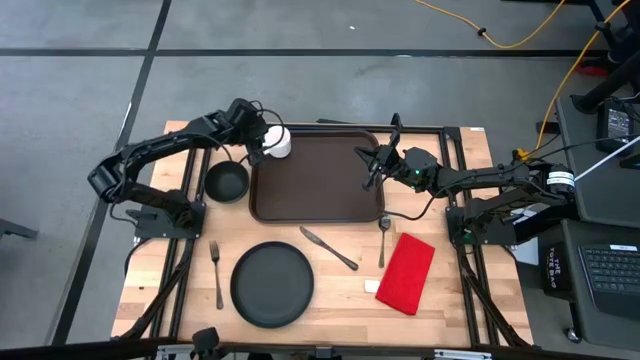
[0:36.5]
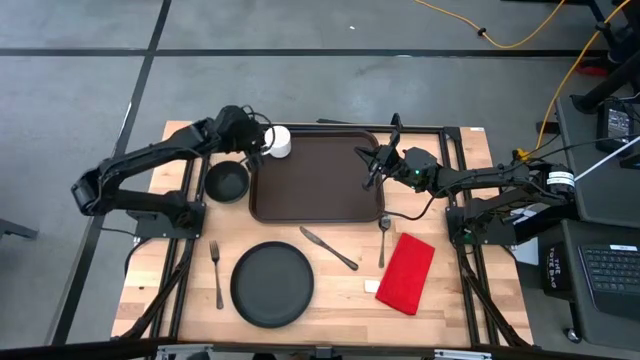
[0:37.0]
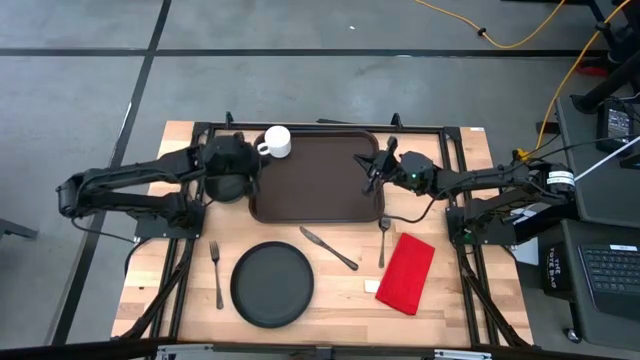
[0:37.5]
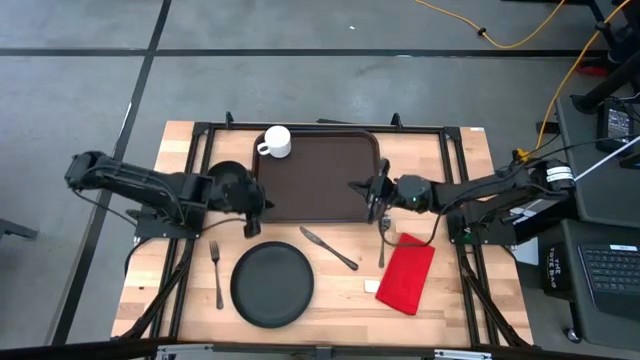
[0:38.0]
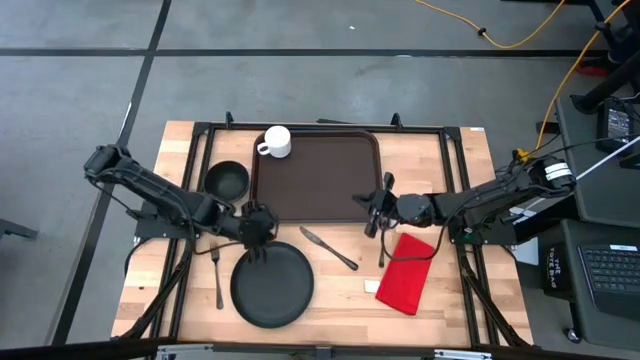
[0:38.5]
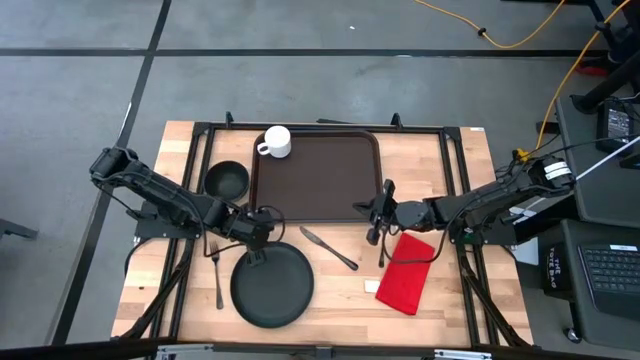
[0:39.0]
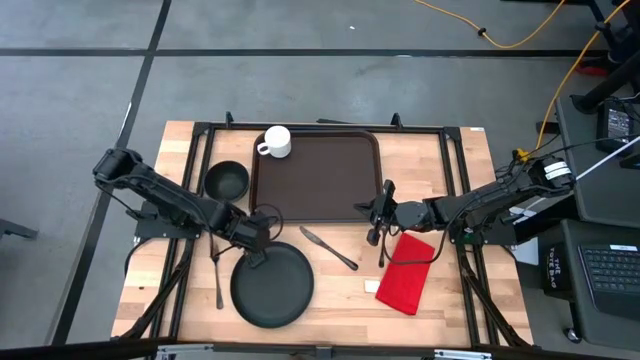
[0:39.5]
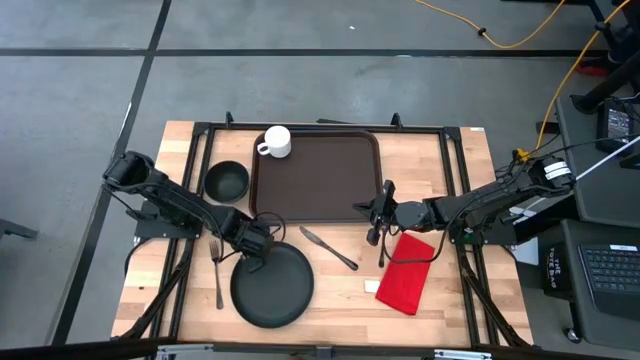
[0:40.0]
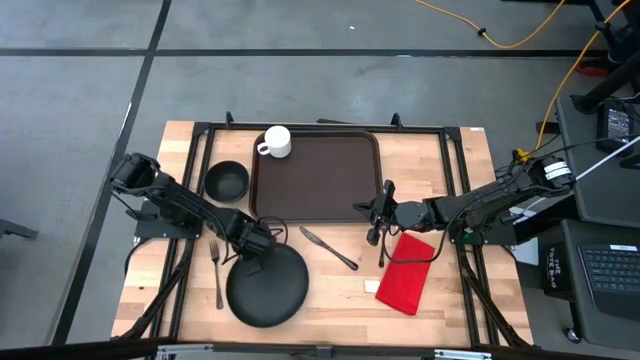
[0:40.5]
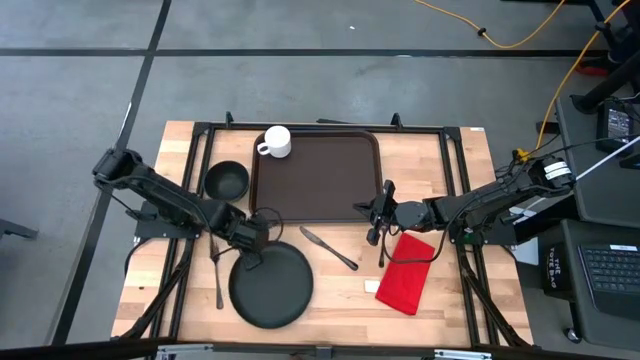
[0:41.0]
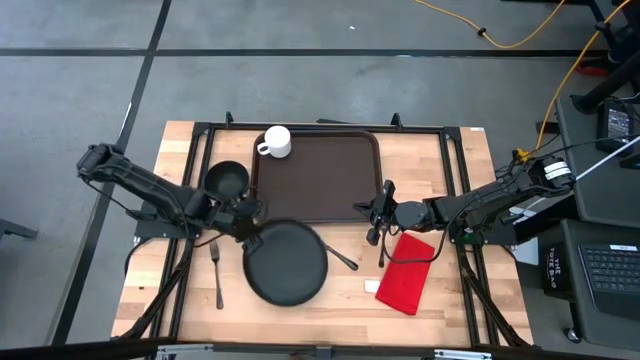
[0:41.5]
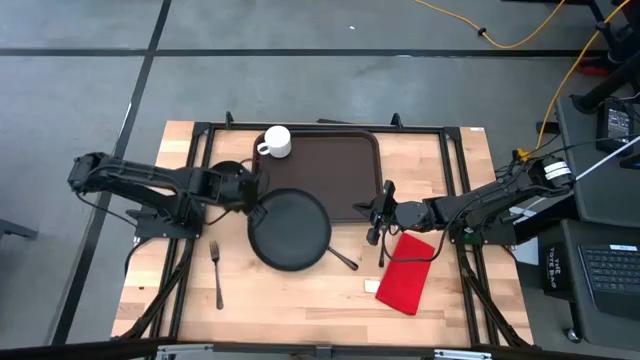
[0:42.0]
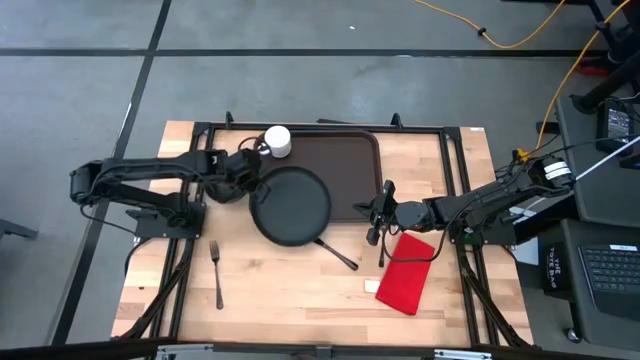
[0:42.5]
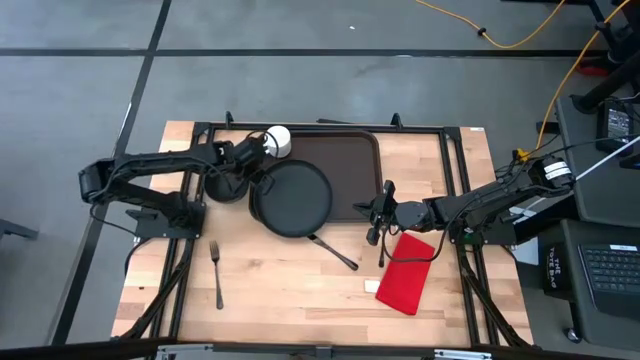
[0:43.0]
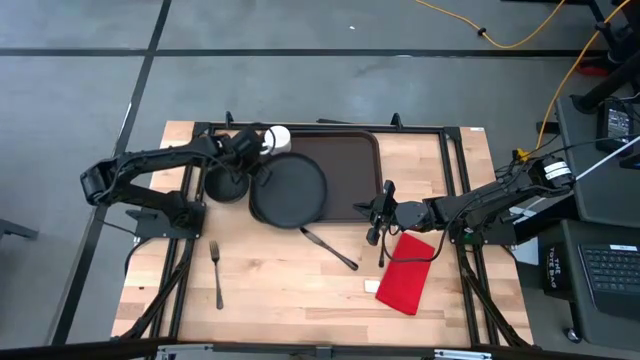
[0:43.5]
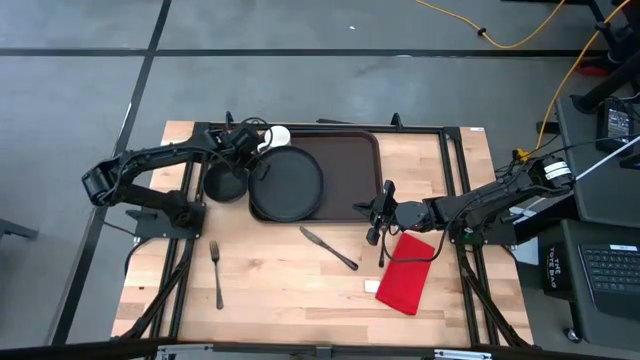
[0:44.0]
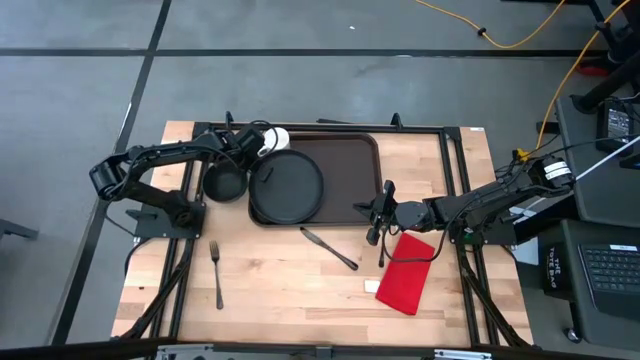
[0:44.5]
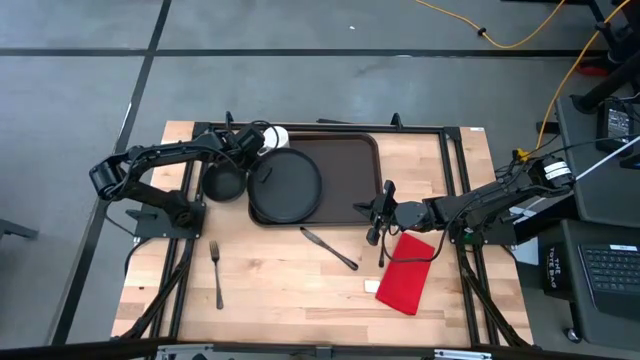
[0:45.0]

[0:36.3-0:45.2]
Task: Set up tray
Put the black plate to the bottom of the white cup on the brown serving tray

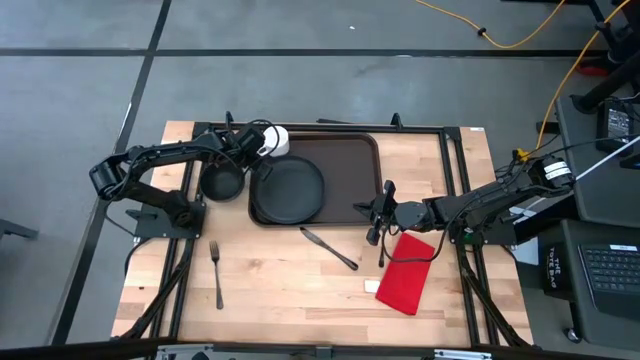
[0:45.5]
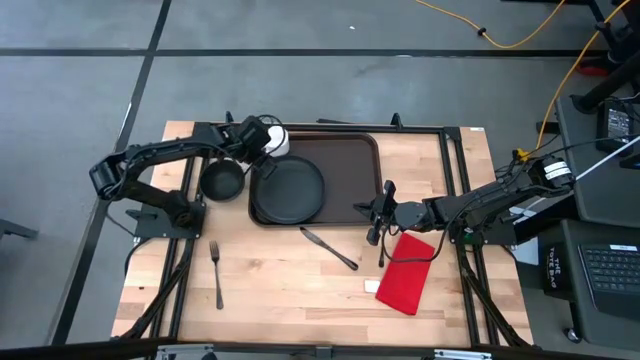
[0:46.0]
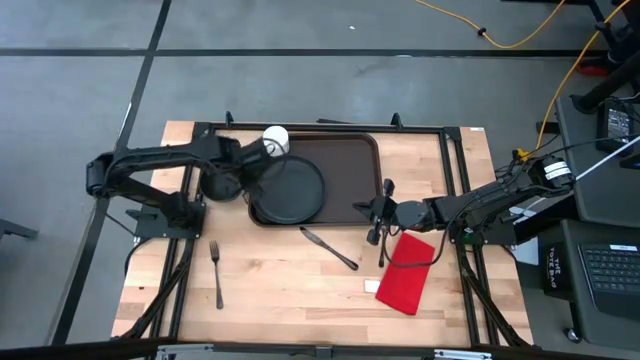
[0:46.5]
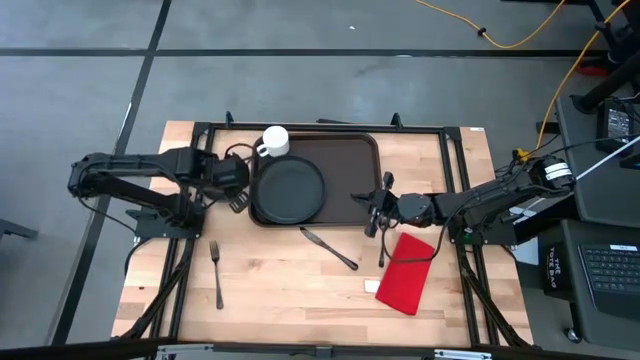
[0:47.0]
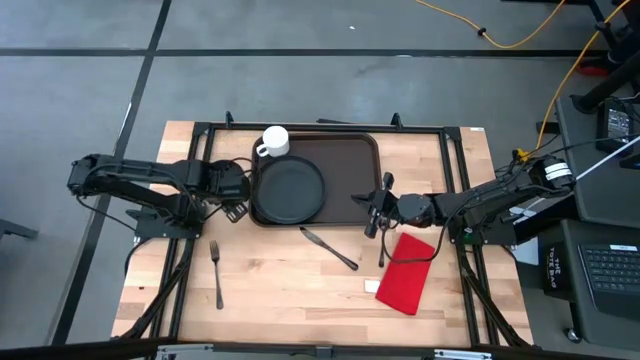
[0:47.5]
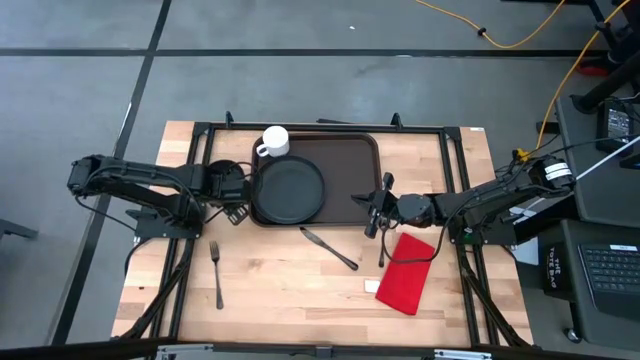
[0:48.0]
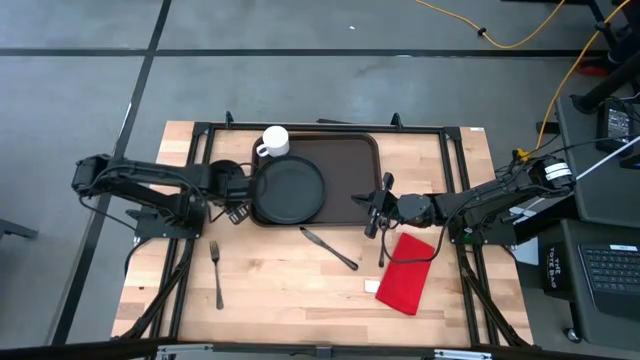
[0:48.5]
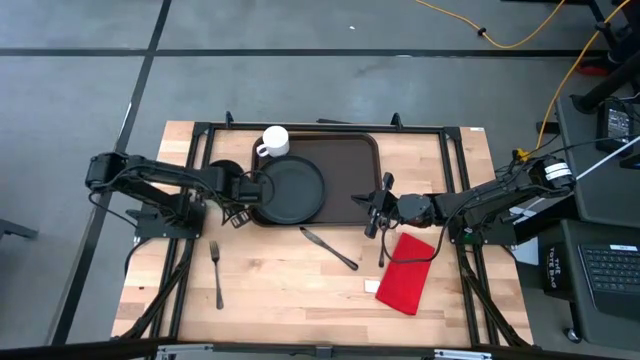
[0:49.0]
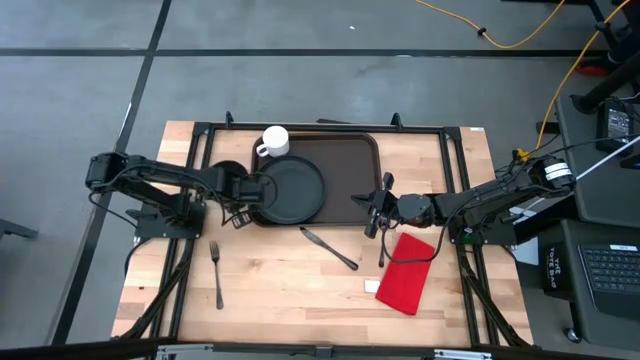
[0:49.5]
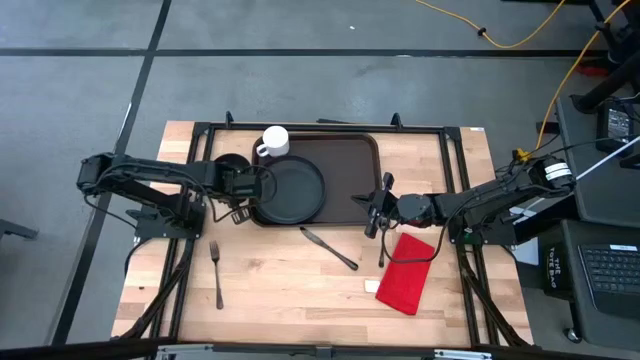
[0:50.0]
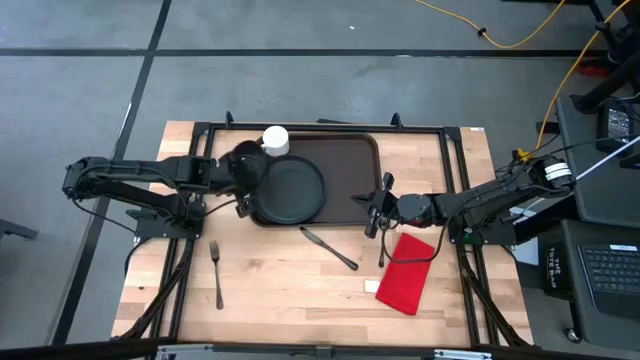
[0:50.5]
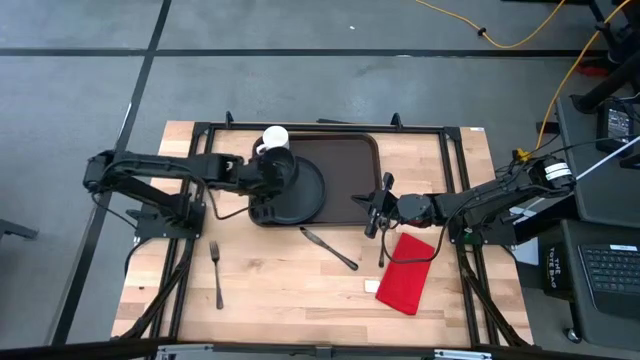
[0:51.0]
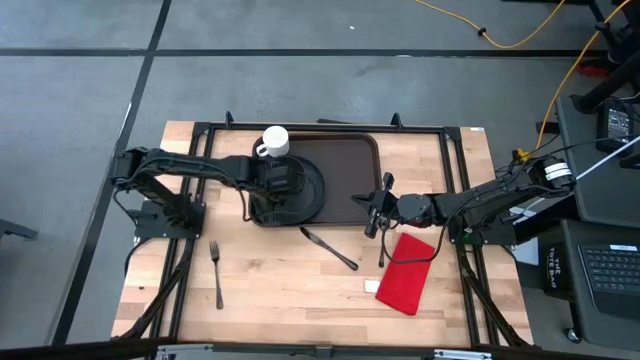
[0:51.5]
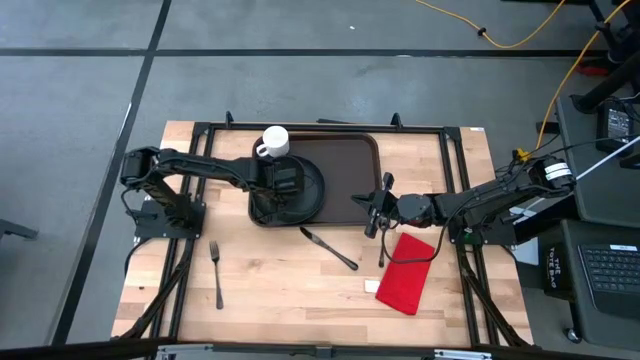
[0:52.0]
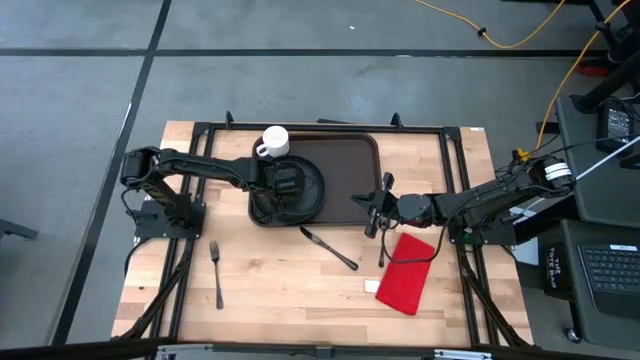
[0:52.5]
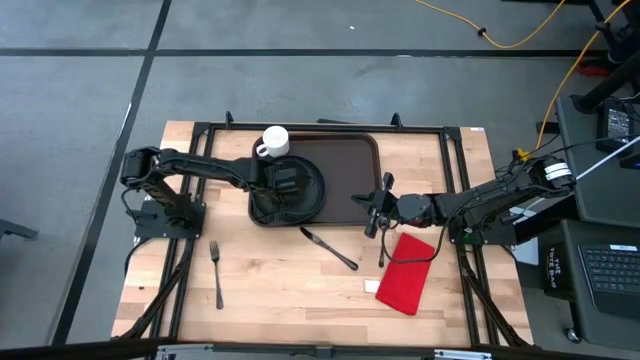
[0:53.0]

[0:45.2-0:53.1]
Put the black bowl on top of the black plate on the brown serving tray

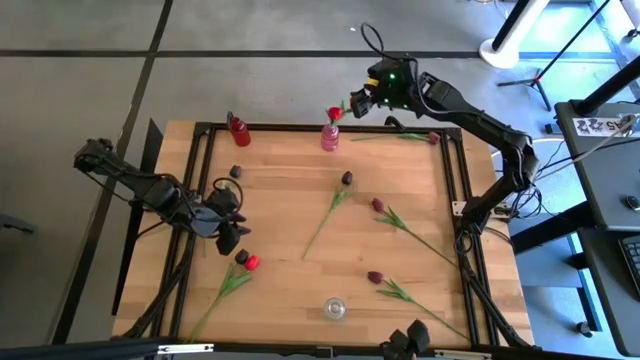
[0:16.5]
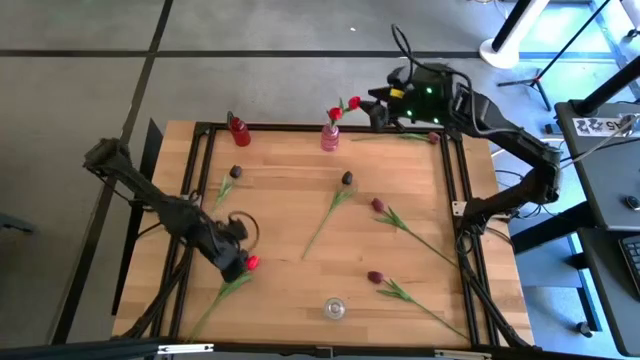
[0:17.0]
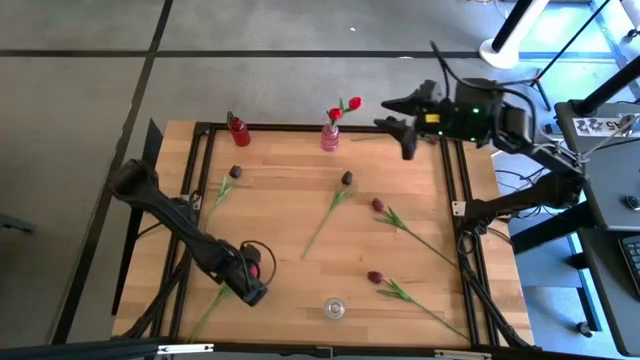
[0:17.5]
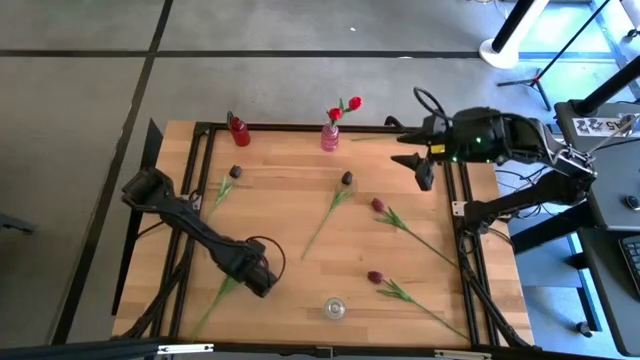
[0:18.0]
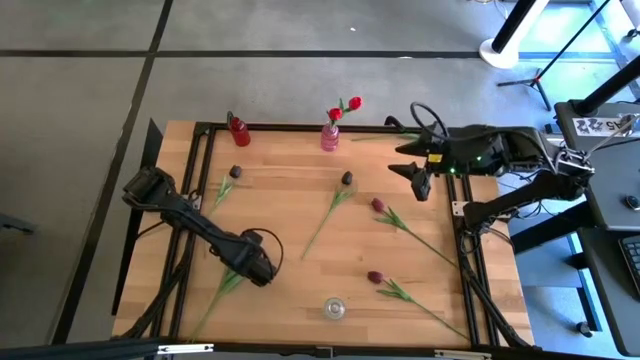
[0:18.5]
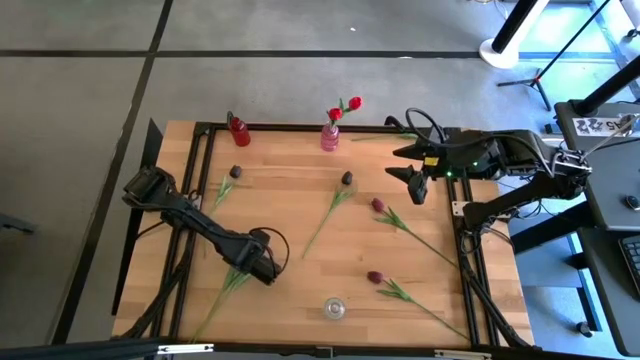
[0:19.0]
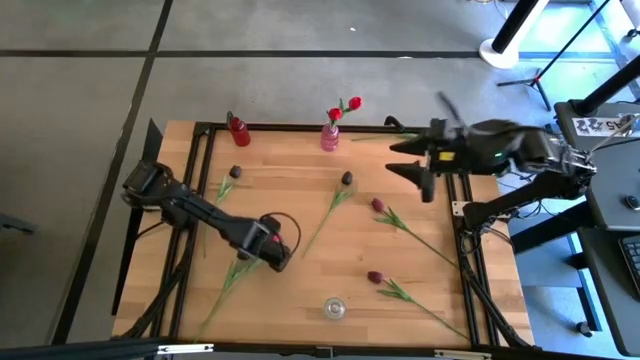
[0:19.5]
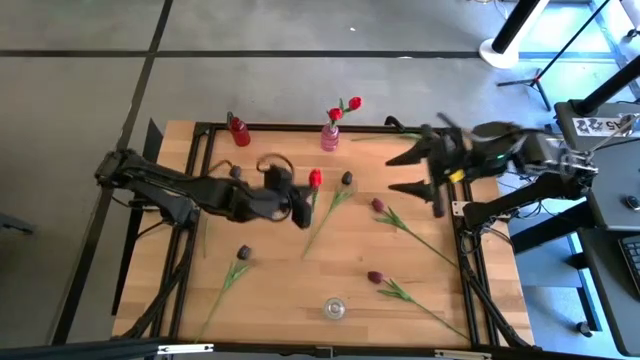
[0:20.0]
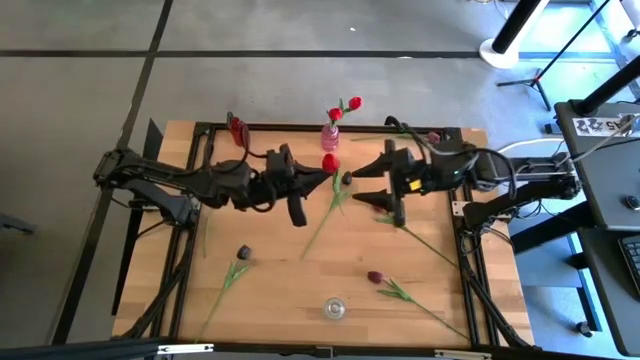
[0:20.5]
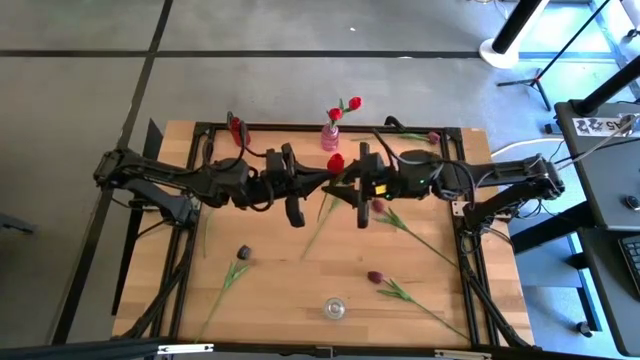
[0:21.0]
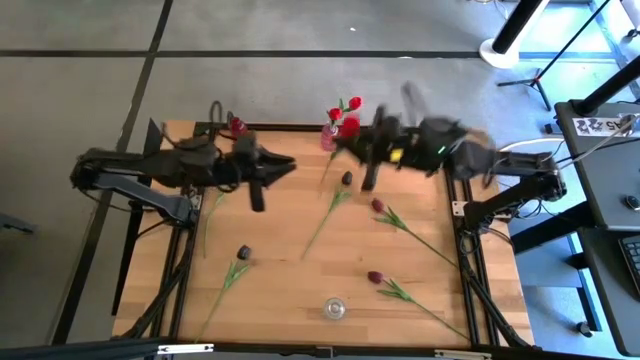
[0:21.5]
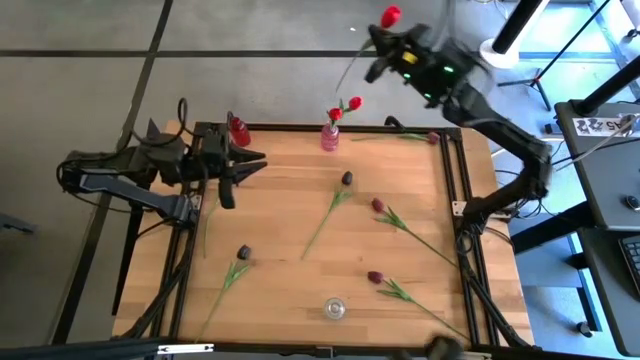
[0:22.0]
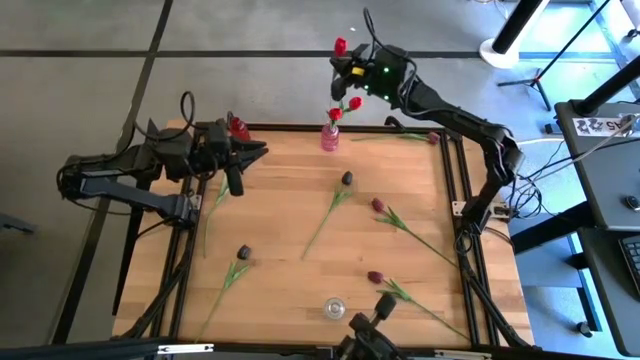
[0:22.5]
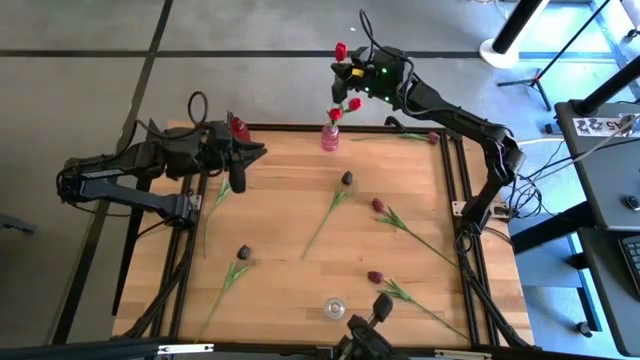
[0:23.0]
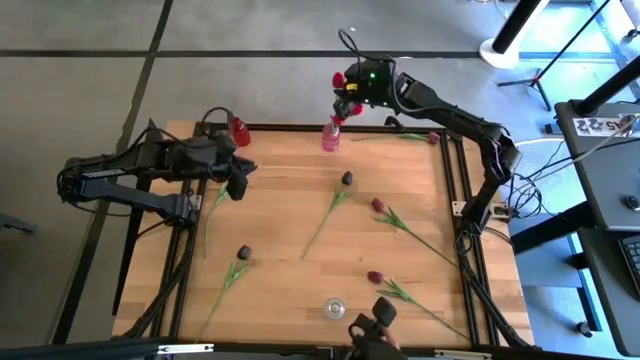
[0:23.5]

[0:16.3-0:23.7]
Task: Sort flowers into vase by color
Put the red flower into the pink flower vase
